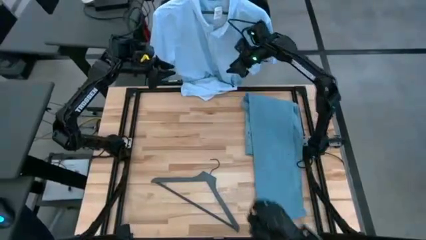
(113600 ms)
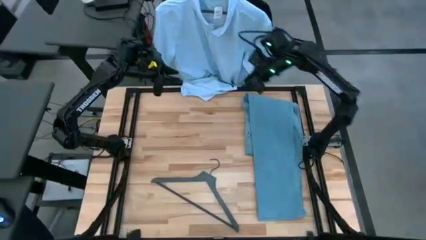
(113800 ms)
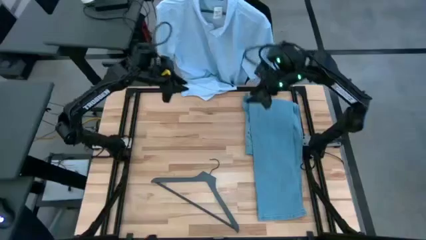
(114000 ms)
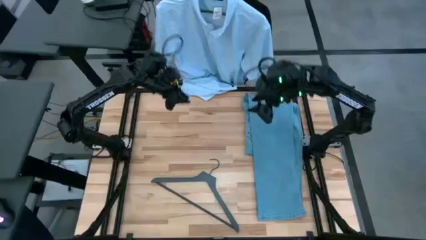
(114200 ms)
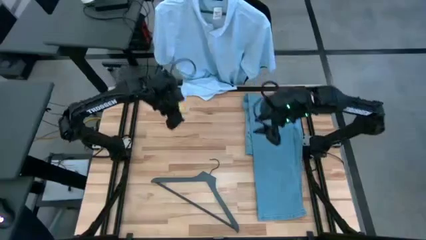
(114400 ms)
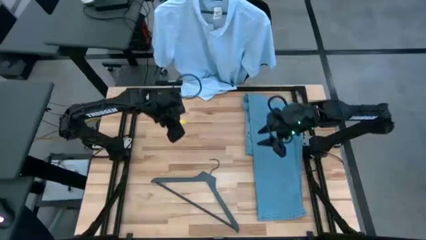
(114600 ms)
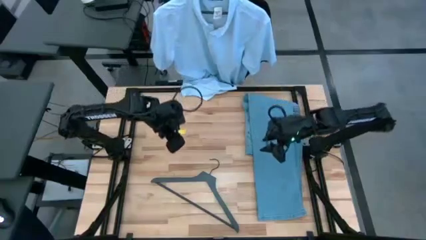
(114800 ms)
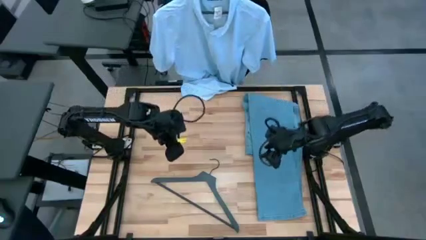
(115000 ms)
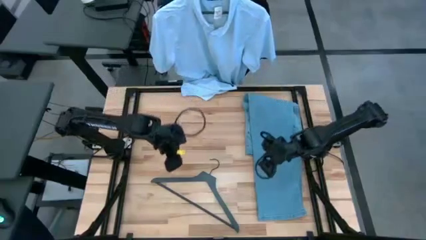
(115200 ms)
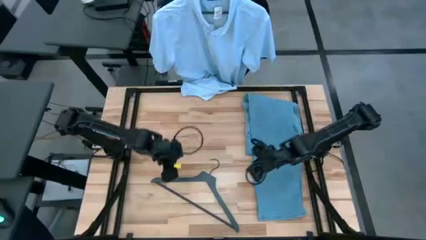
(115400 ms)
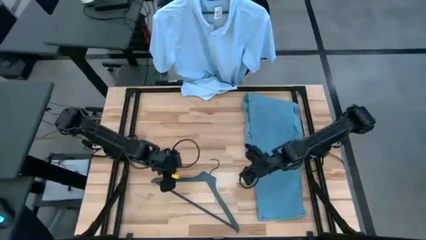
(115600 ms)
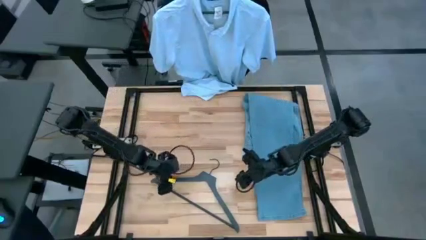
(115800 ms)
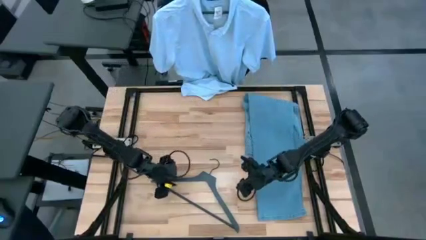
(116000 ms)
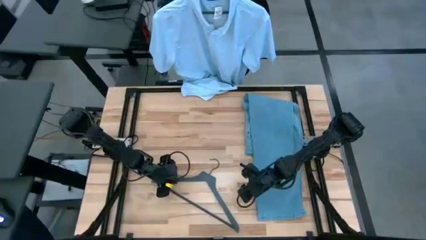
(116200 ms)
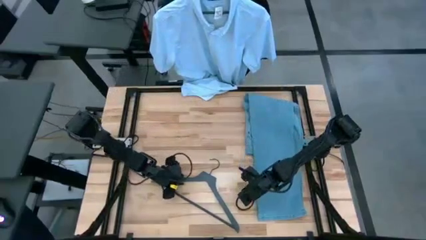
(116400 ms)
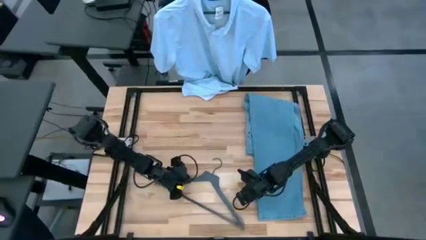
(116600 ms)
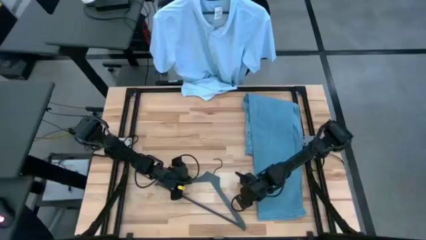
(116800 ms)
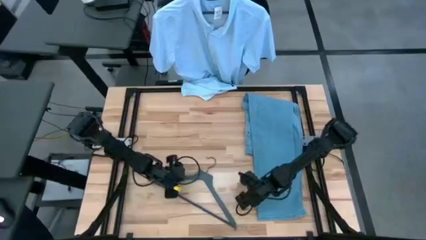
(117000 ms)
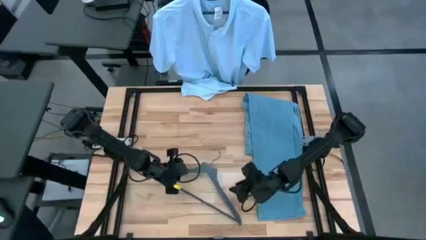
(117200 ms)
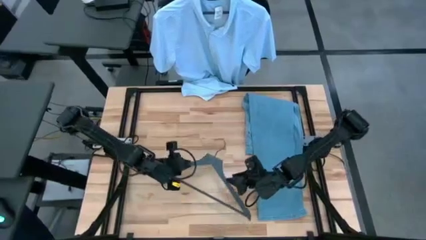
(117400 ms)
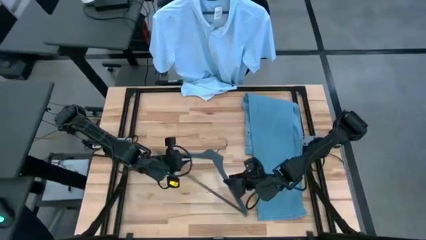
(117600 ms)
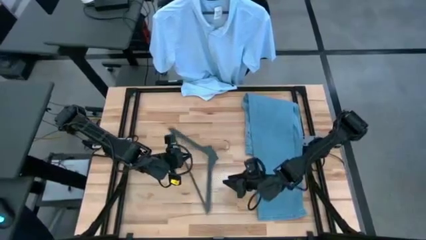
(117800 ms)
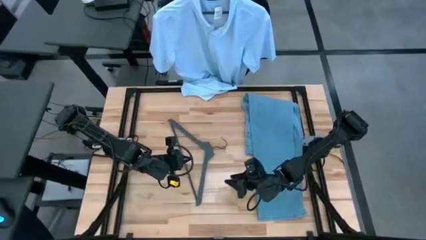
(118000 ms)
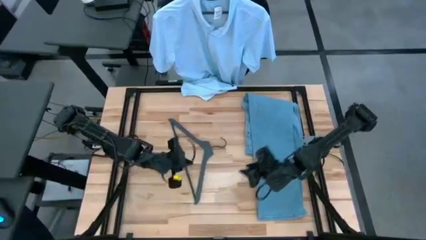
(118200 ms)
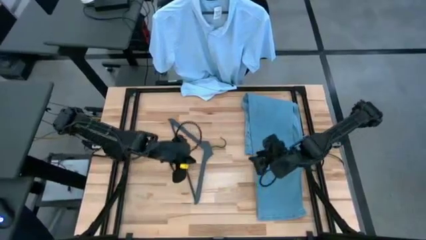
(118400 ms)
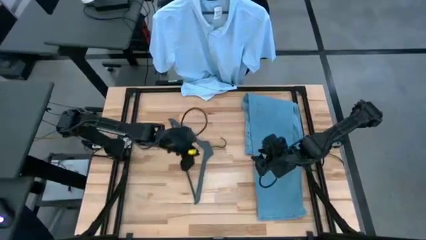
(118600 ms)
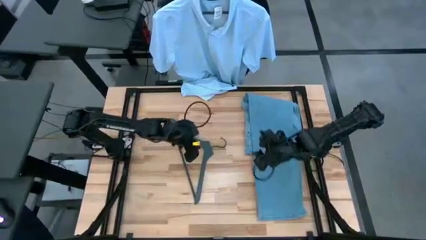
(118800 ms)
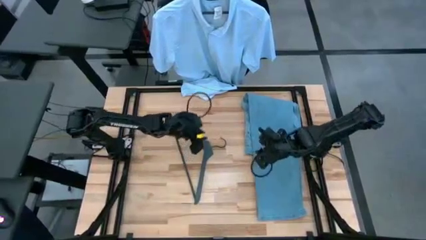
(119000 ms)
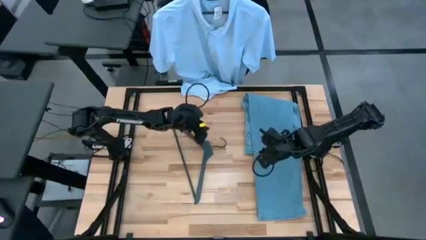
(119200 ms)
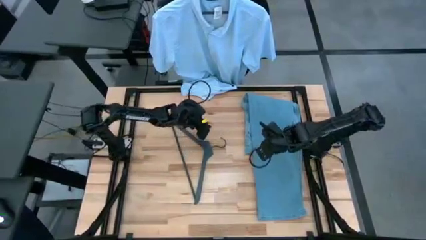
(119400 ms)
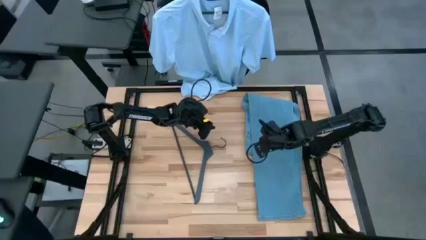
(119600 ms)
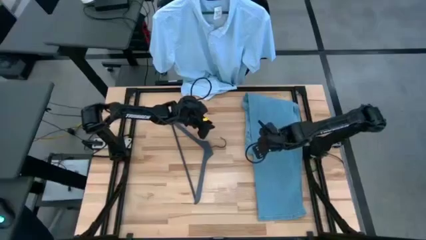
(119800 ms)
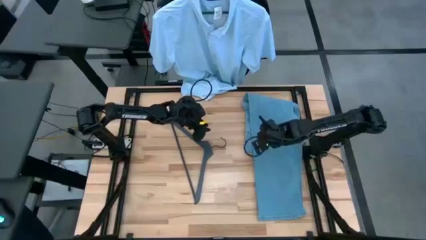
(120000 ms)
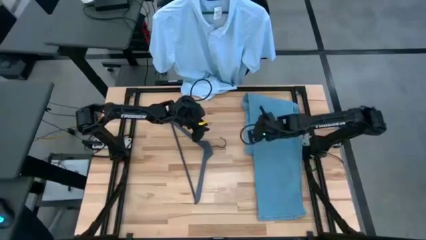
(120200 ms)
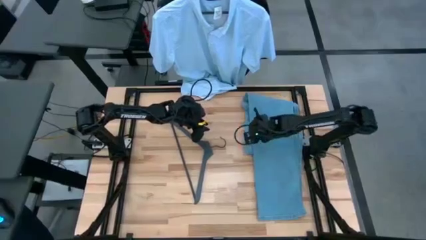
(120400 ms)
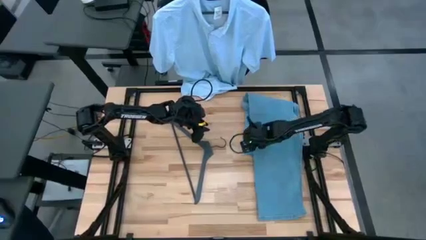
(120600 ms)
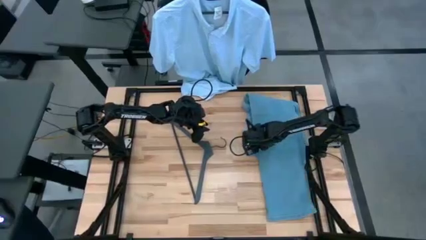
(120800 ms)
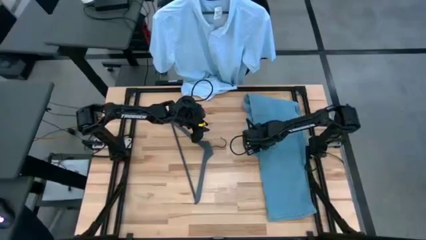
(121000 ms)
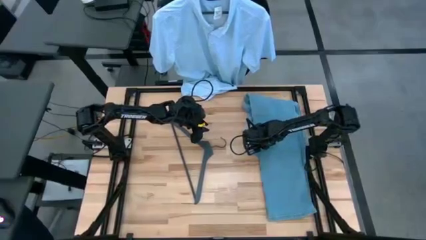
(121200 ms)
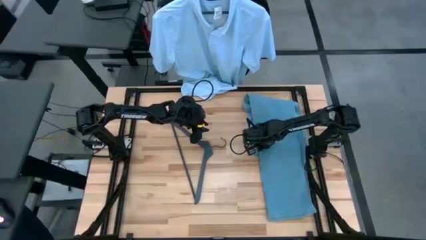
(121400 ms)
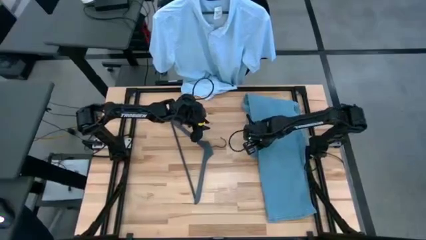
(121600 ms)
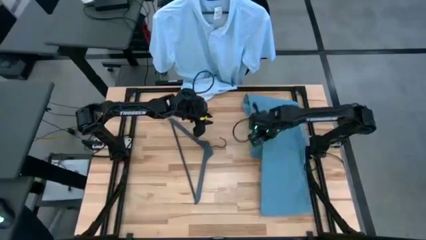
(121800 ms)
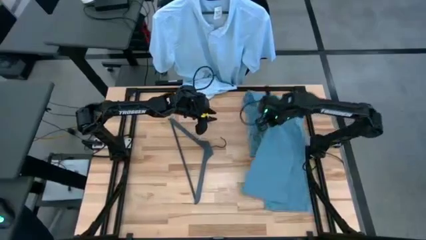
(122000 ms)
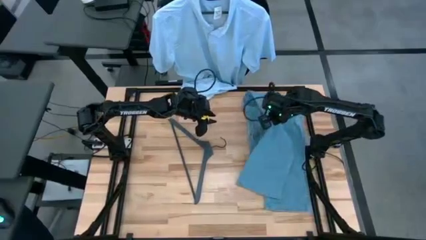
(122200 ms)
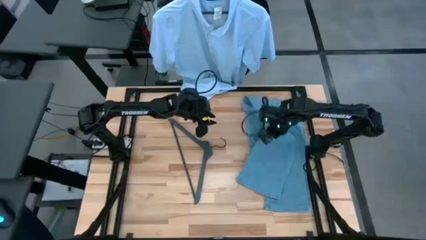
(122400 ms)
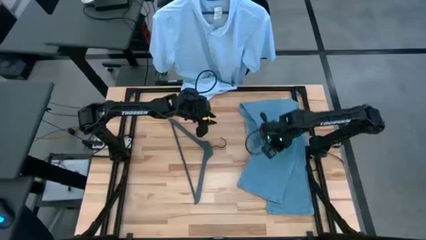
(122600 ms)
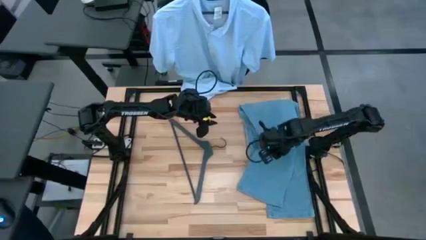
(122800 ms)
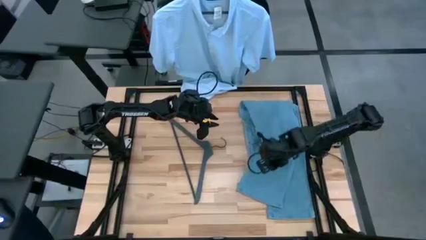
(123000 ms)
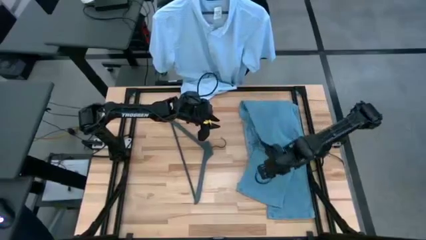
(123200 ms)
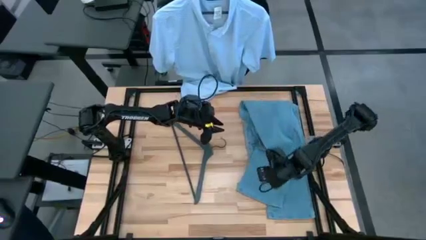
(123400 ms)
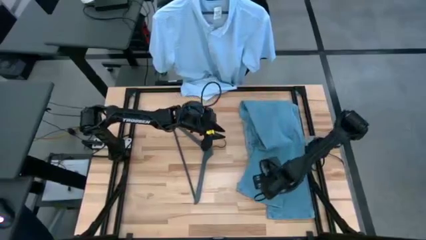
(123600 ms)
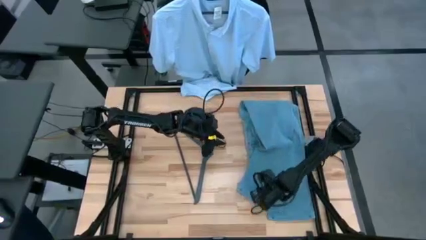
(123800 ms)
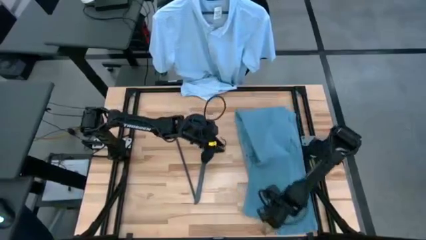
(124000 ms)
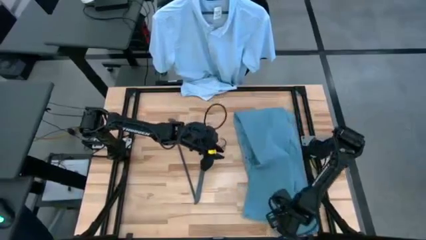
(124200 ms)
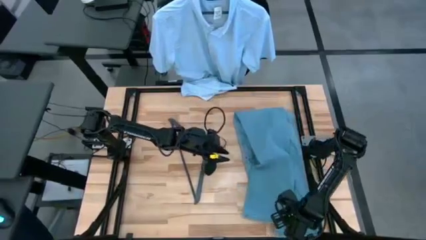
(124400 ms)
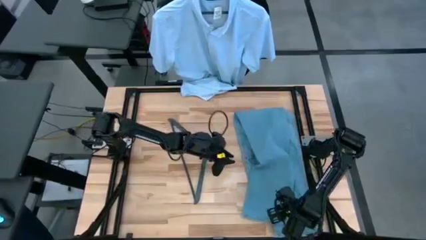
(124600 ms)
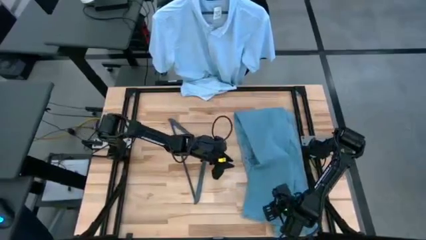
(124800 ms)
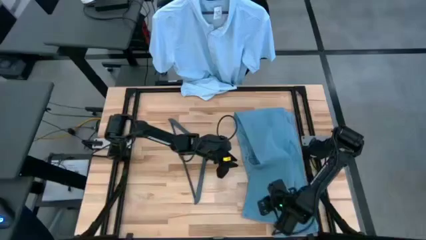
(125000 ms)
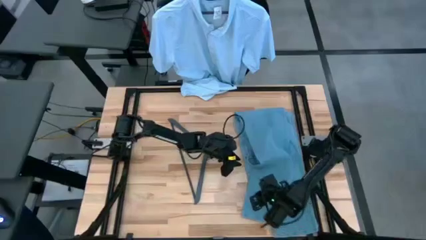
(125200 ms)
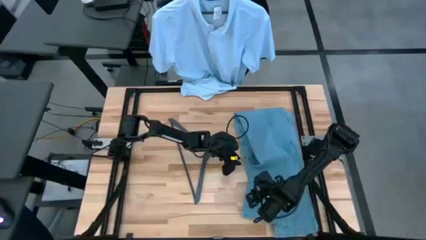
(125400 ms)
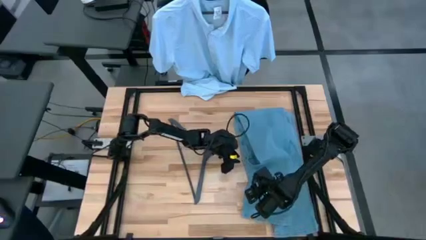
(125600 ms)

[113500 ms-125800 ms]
Task: Hang clothes
Insert the blue jeans on the grey hanger

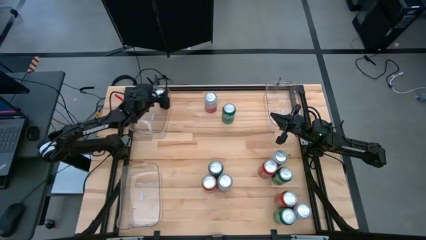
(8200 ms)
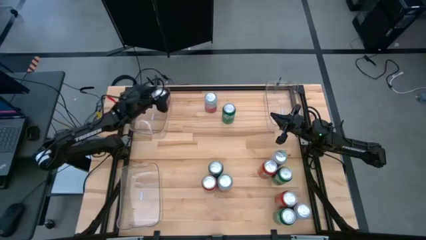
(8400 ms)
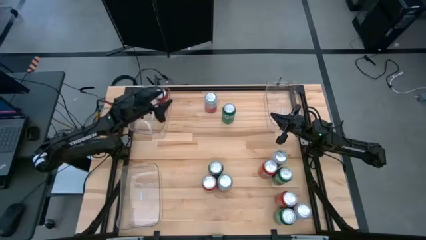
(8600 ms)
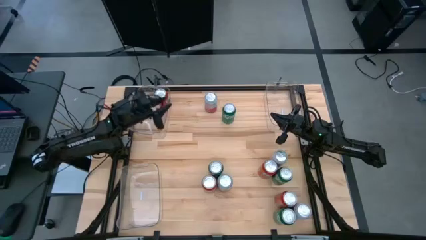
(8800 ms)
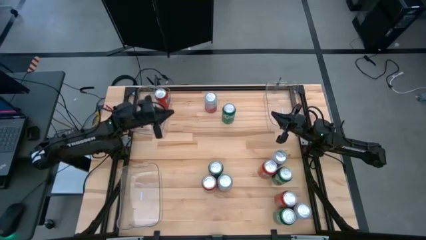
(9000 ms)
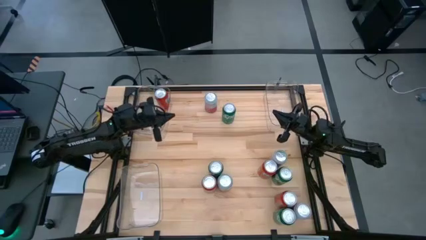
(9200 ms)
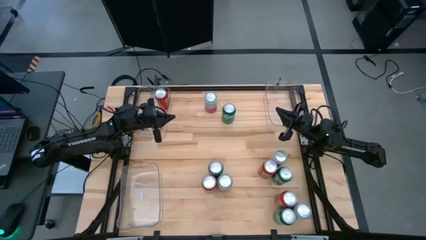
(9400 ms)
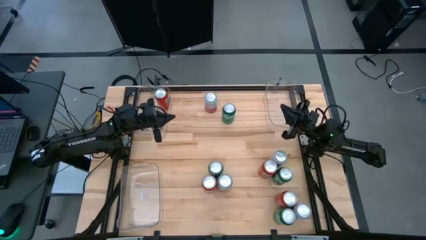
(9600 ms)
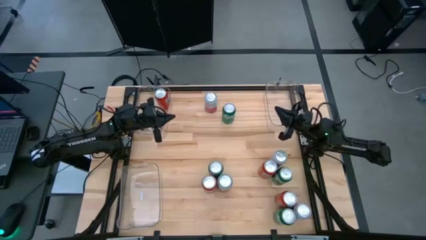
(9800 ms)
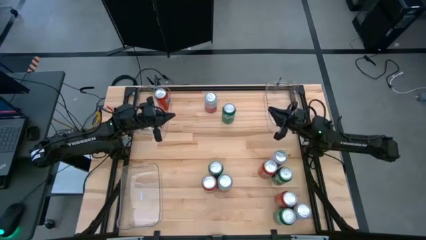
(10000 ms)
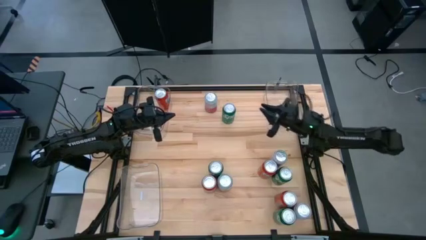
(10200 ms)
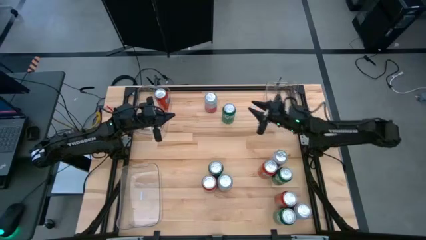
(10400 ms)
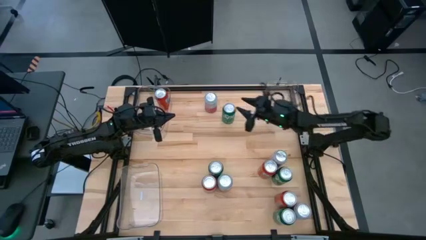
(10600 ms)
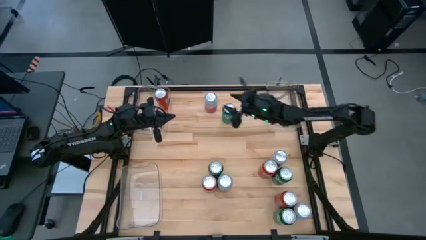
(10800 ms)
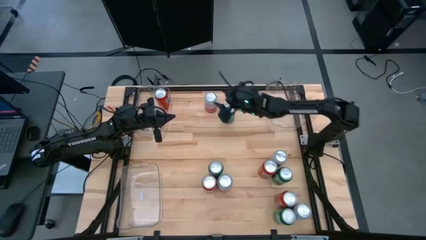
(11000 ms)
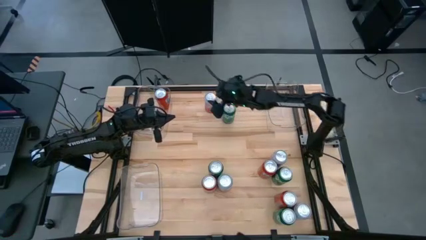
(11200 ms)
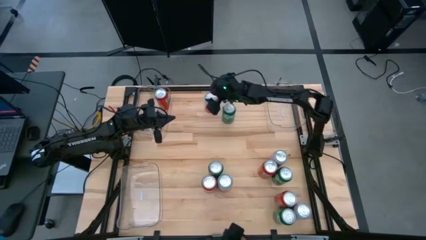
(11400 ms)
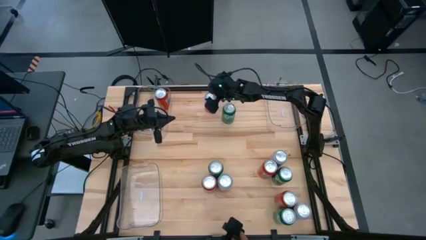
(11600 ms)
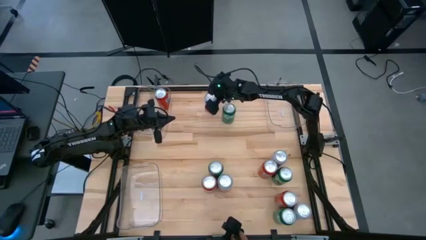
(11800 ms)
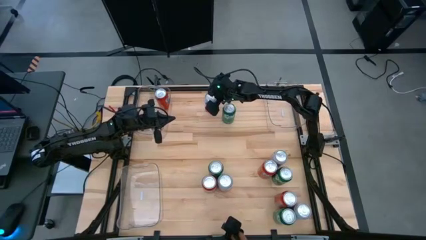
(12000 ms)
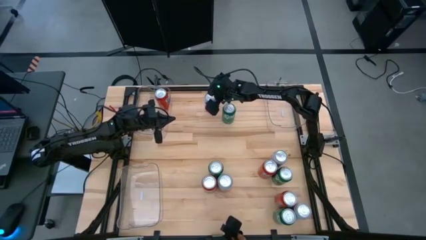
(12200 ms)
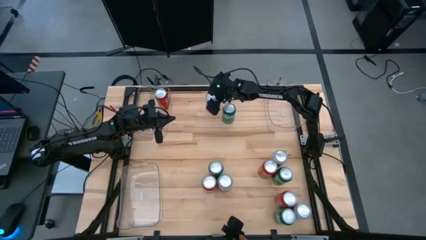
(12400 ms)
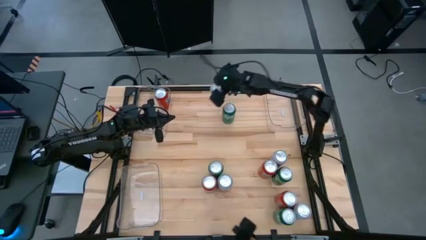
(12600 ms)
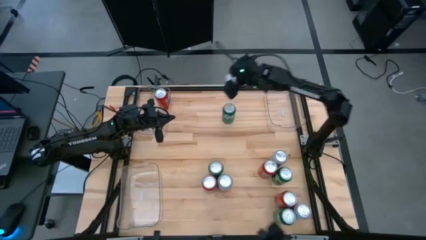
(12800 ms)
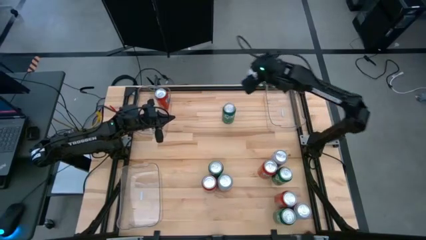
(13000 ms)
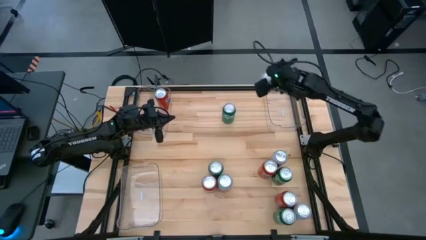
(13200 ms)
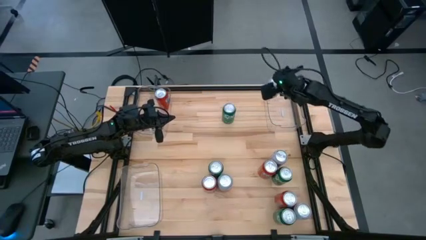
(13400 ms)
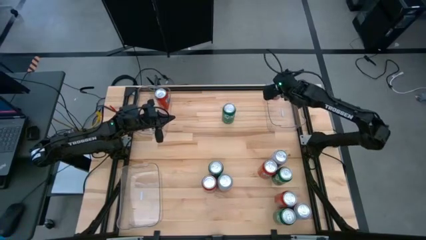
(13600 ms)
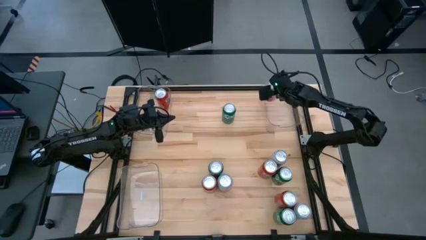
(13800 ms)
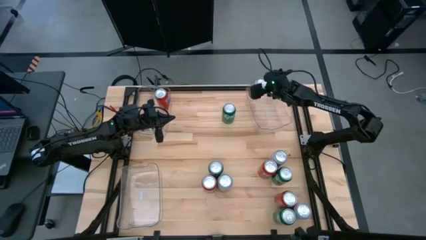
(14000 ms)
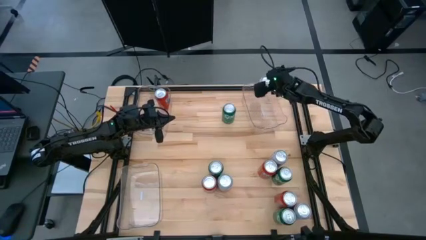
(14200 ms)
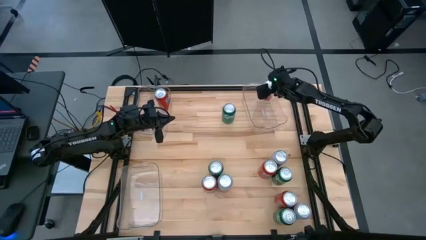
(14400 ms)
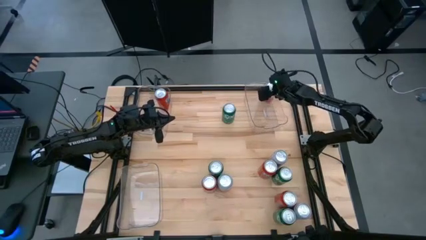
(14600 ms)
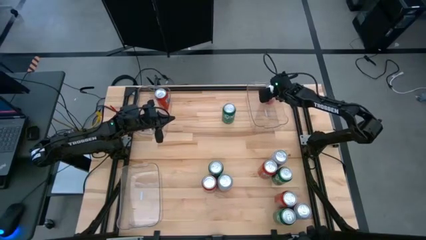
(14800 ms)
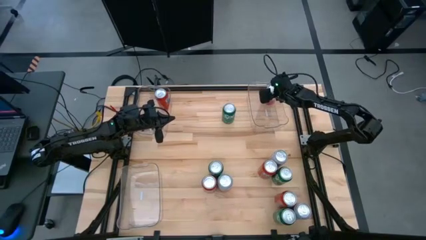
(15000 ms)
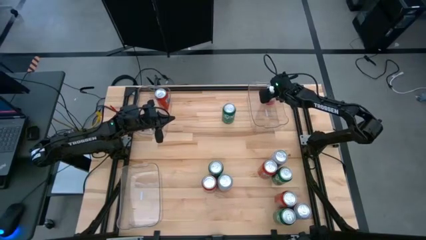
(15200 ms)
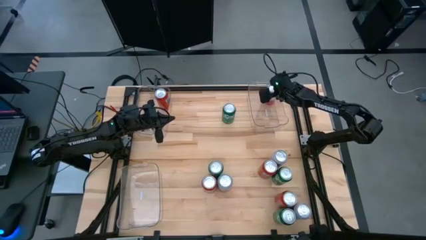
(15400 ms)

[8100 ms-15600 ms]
Task: Sort soda cans
Put the top pink white soda can into the top right transparent bin
